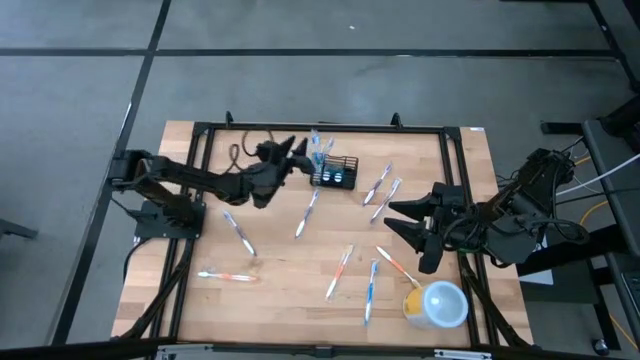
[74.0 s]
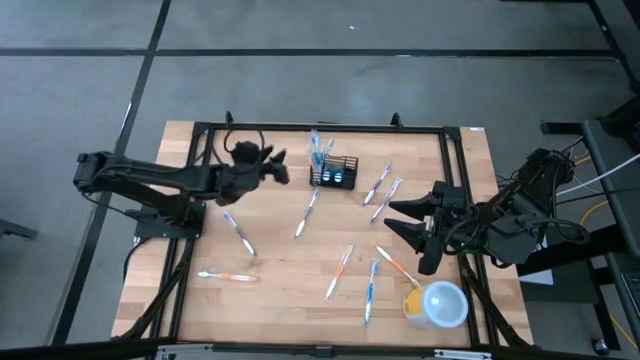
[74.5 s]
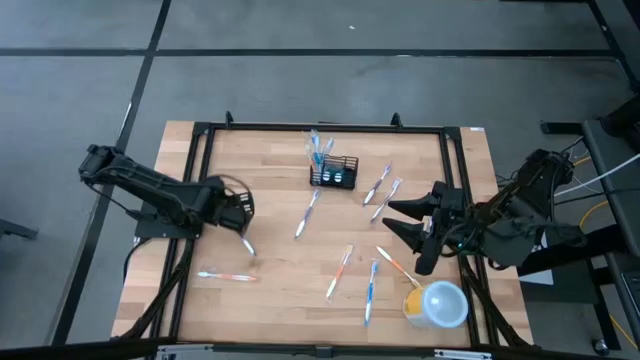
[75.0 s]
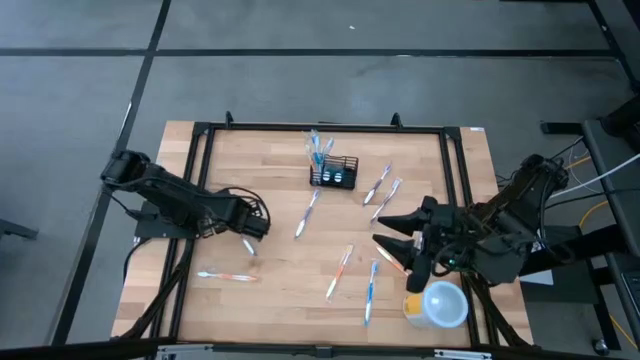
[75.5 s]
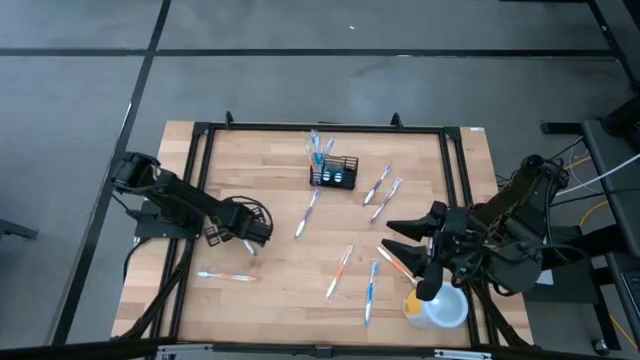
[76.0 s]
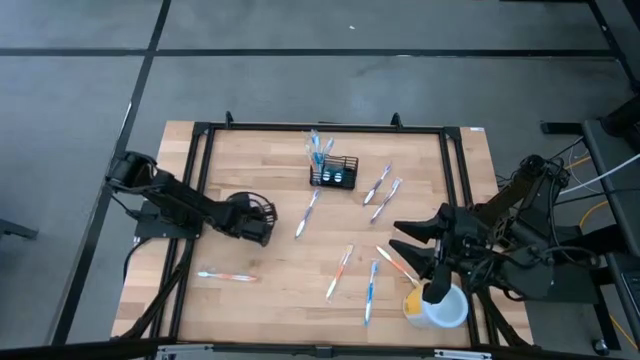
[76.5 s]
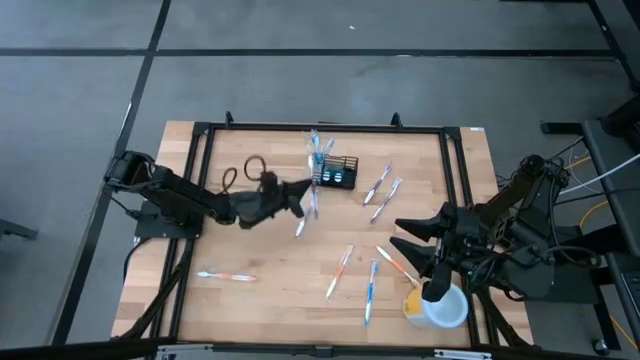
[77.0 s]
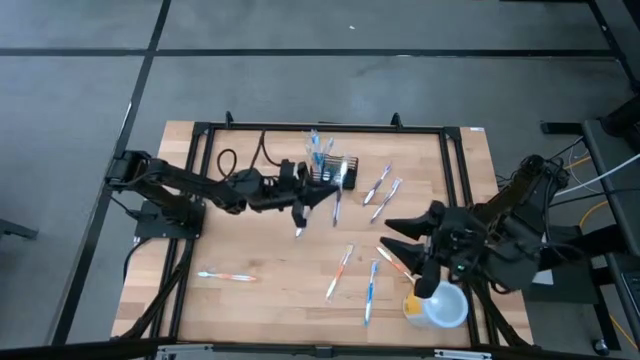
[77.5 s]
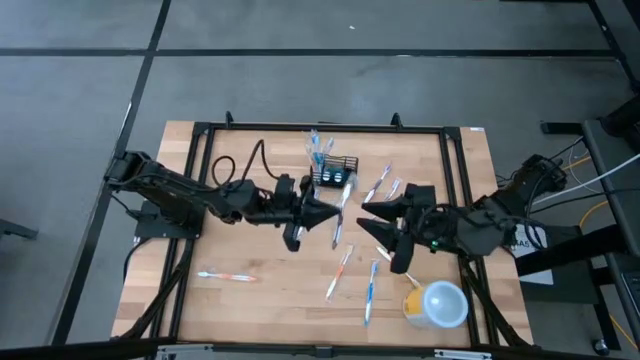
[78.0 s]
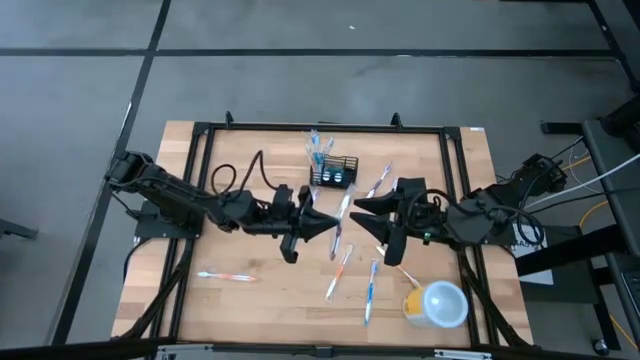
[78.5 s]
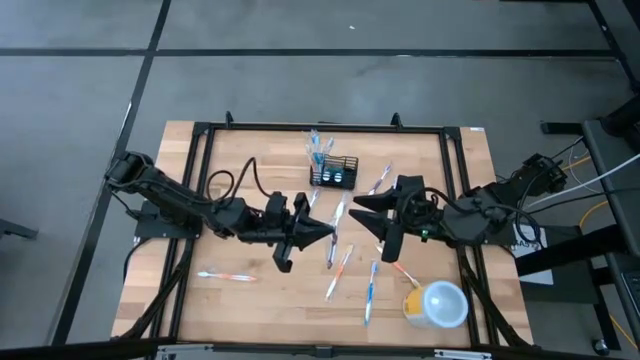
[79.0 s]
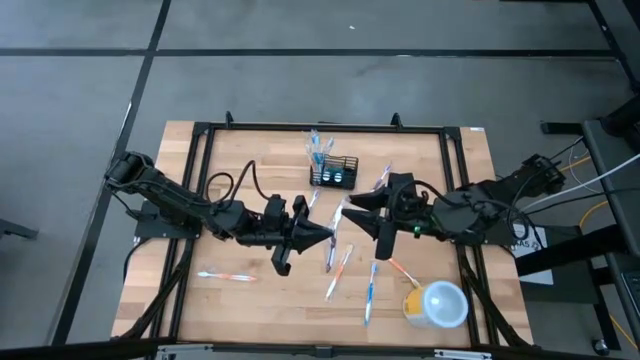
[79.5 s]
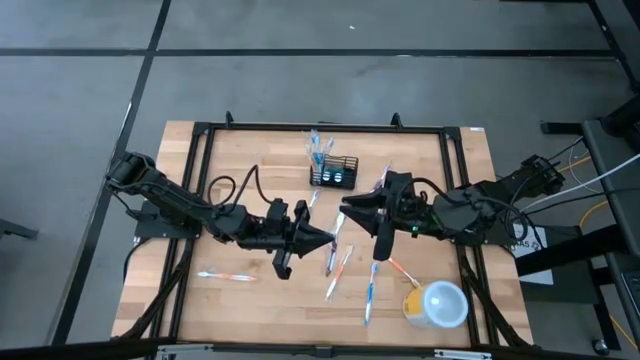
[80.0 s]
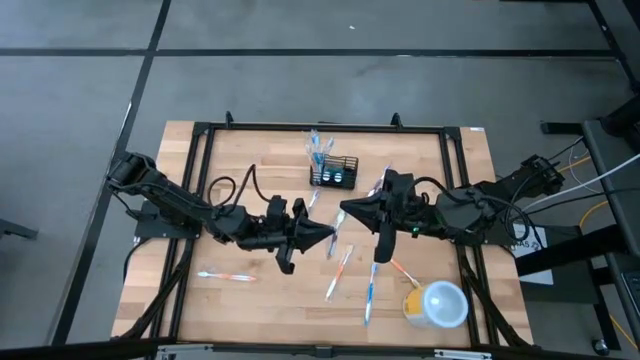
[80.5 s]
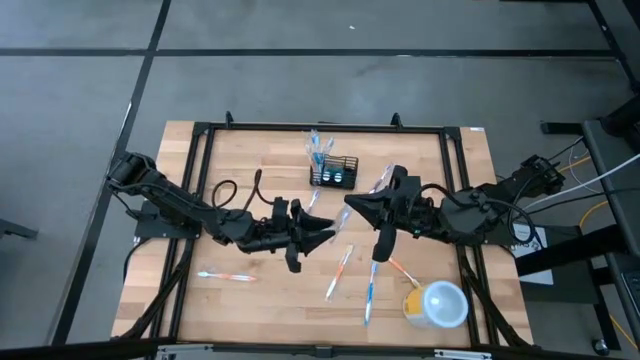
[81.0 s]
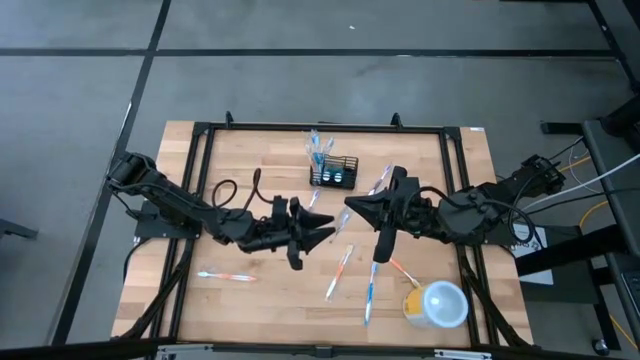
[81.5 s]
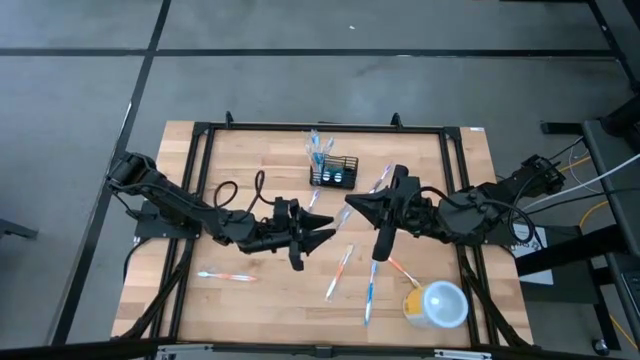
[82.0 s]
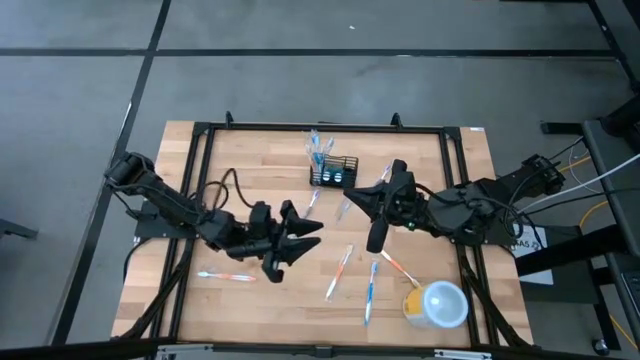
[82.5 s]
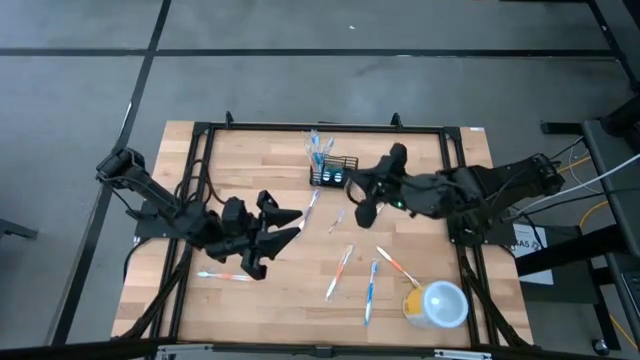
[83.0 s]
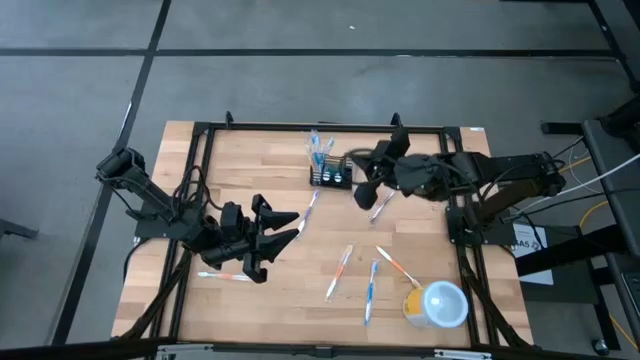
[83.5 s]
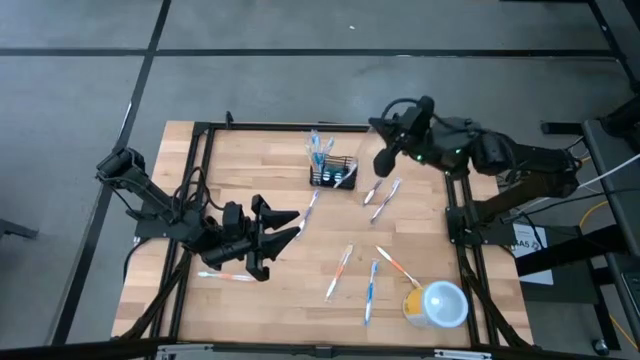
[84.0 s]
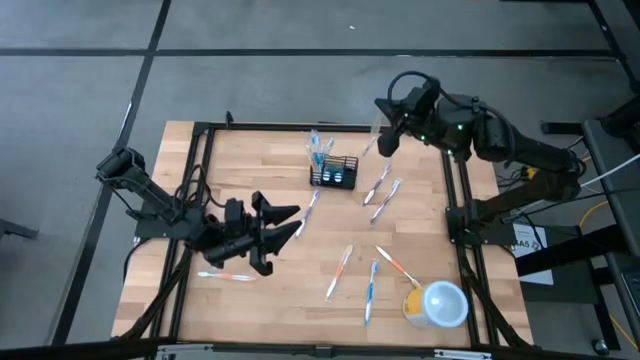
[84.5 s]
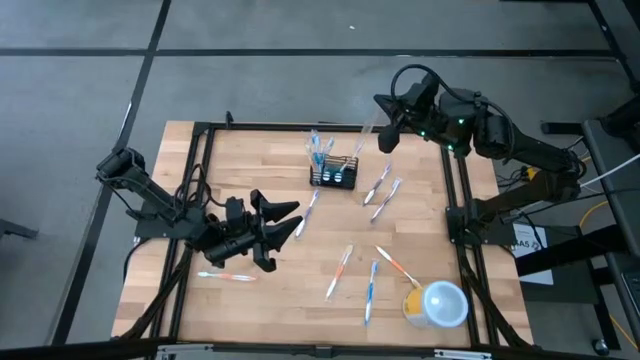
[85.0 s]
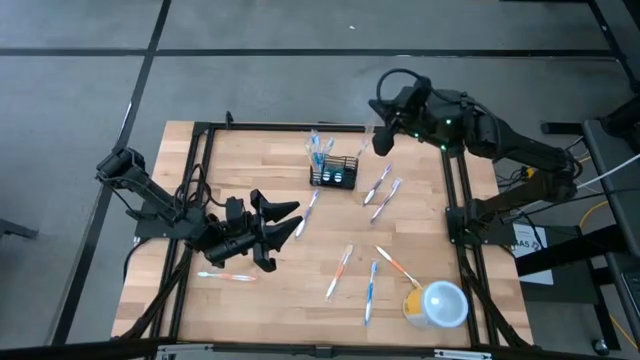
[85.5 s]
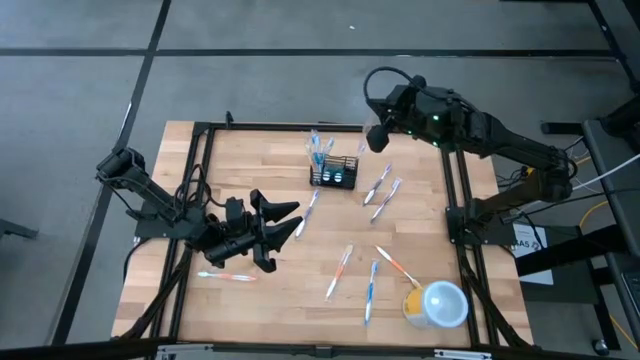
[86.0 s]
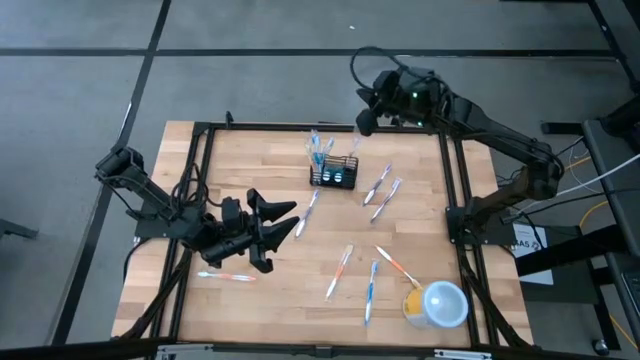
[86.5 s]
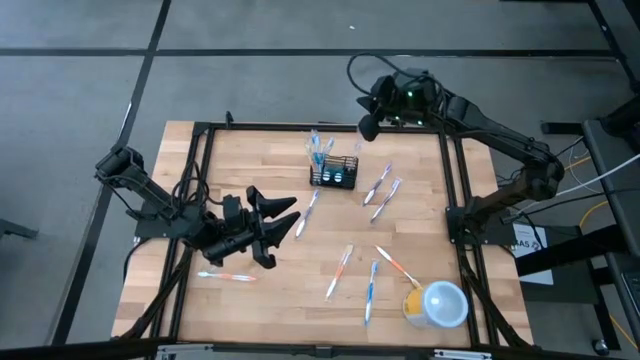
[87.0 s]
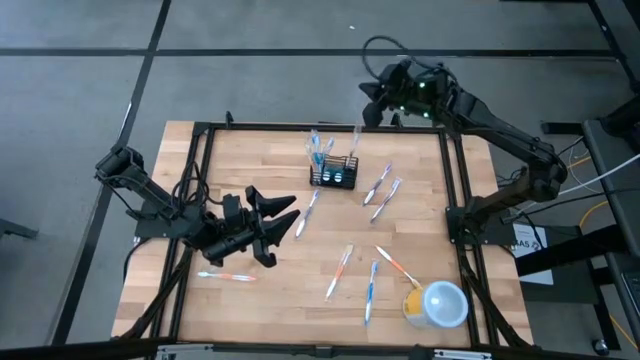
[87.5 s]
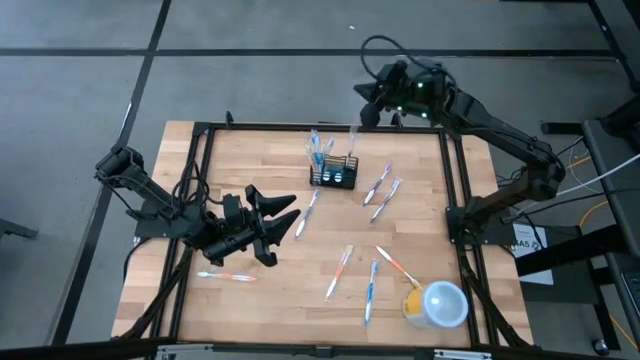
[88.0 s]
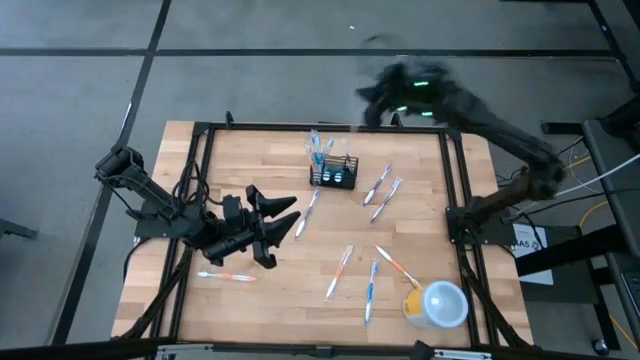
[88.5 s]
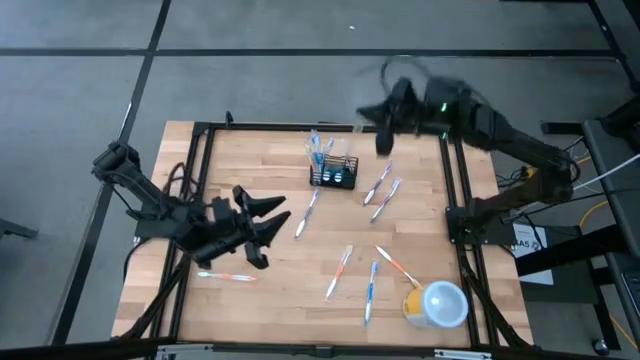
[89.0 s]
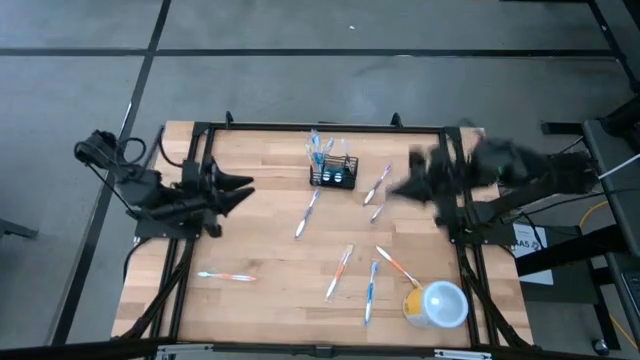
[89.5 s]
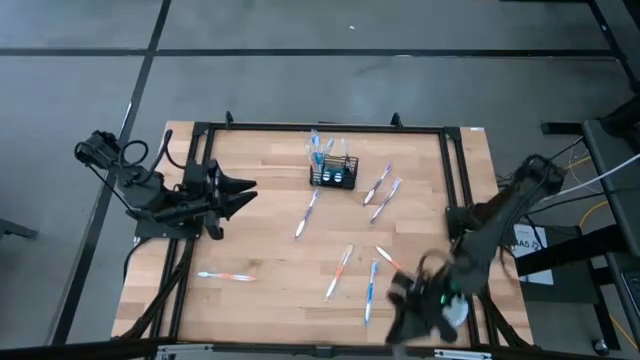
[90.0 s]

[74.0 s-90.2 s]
Task: Pick & Place toothbrushing station
Put the violet toothbrush into the right section of the mesh organizer

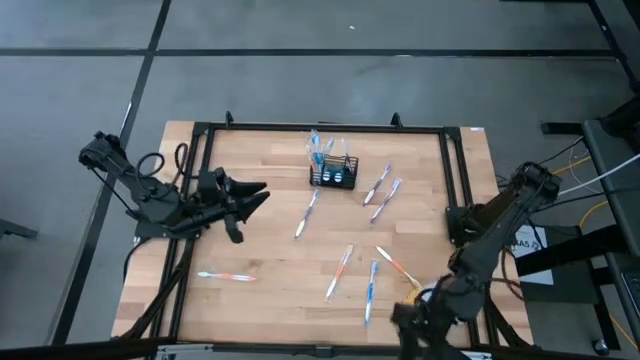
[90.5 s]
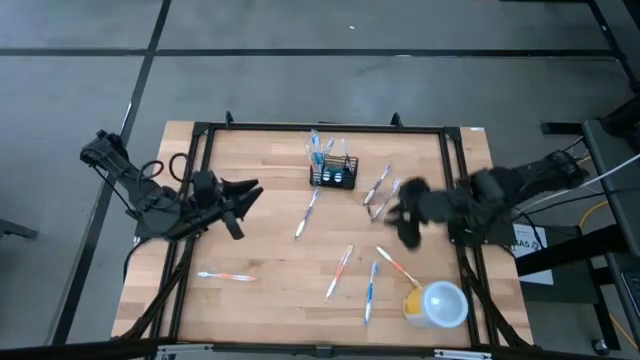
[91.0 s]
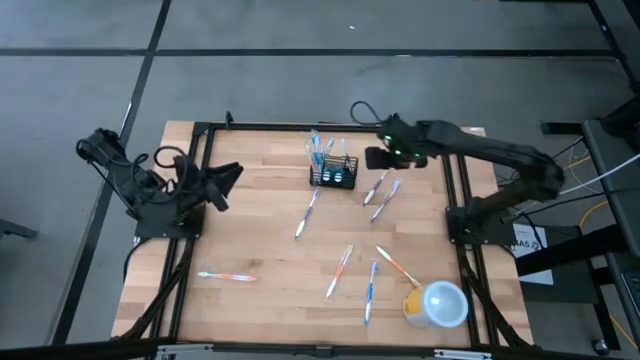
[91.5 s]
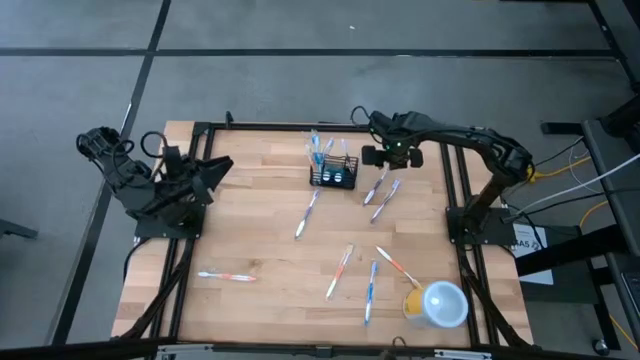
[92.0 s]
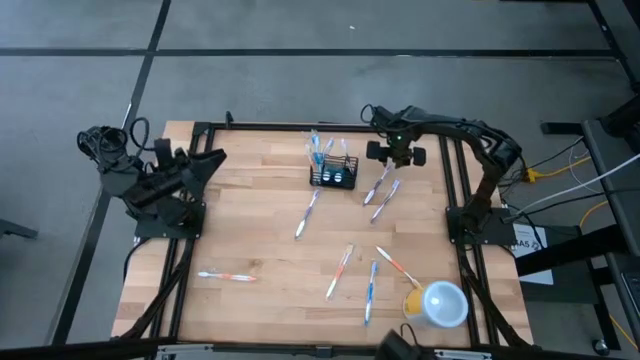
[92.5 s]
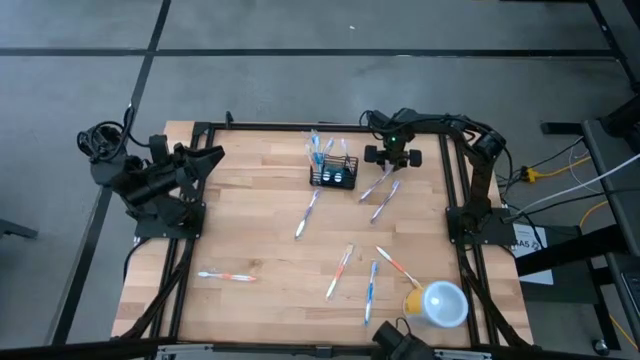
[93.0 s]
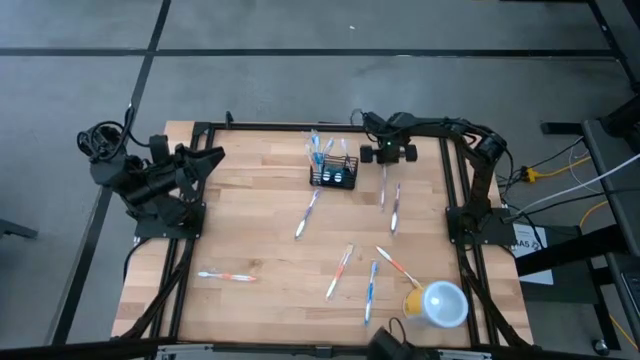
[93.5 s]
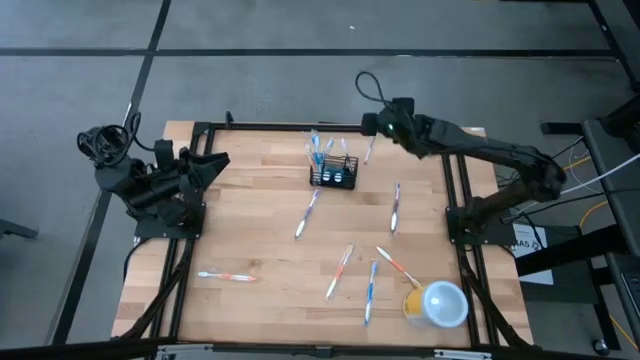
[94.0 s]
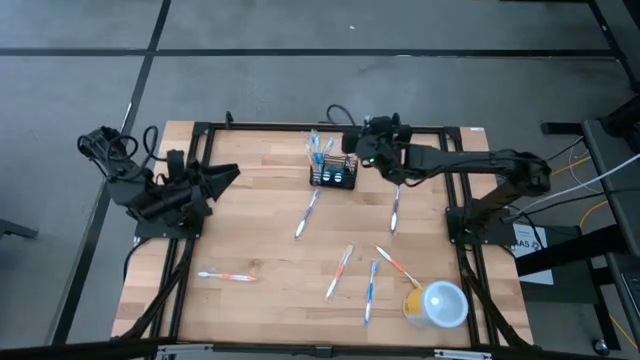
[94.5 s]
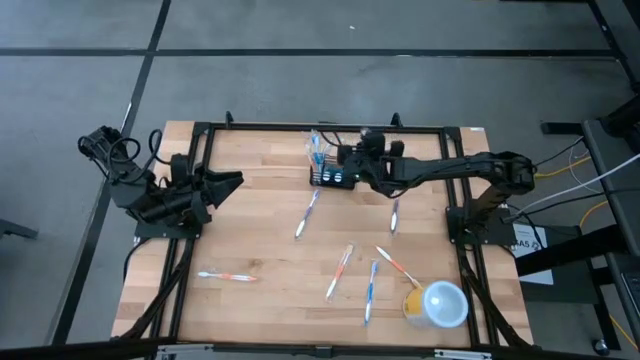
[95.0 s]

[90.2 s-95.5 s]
Put the middle violet toothbrush into the right section of the mesh organizer
